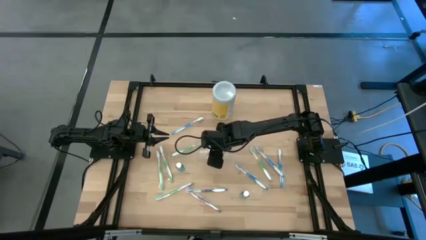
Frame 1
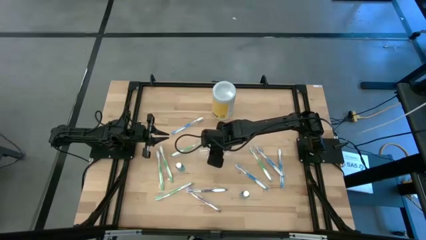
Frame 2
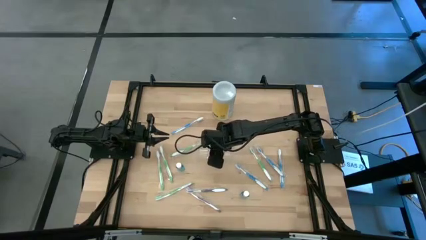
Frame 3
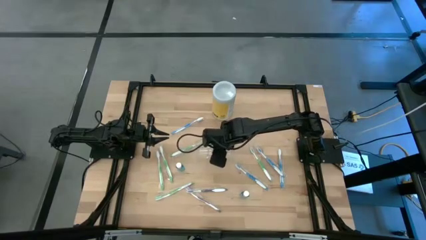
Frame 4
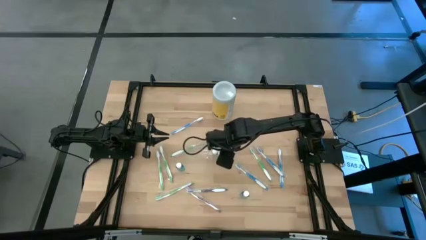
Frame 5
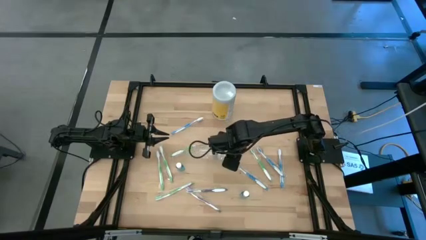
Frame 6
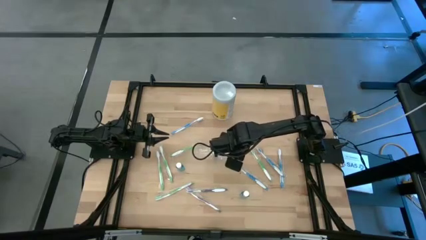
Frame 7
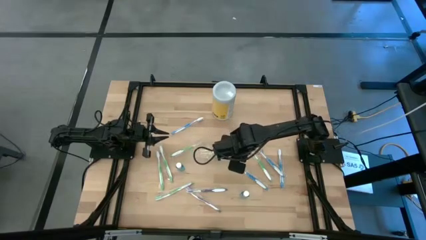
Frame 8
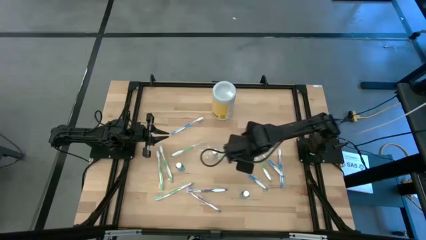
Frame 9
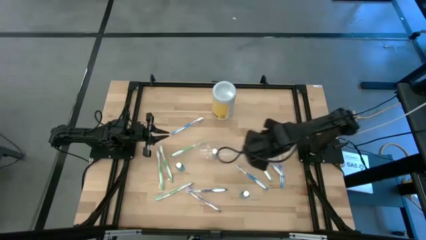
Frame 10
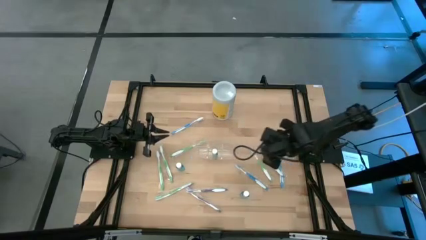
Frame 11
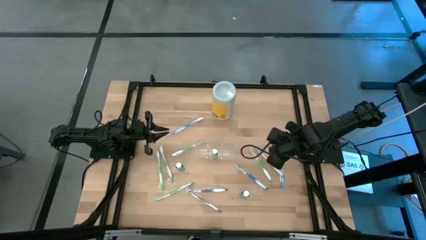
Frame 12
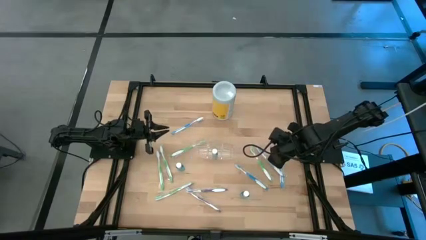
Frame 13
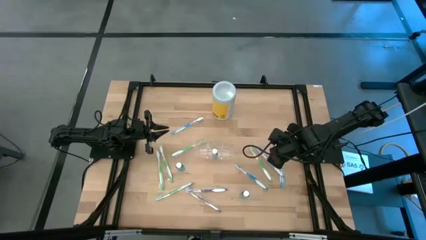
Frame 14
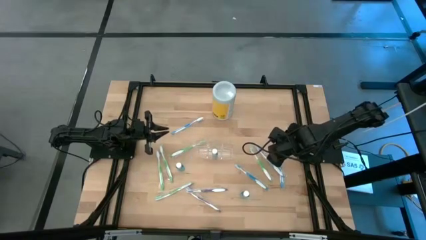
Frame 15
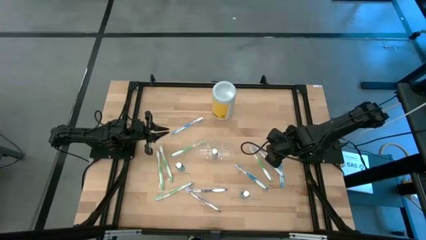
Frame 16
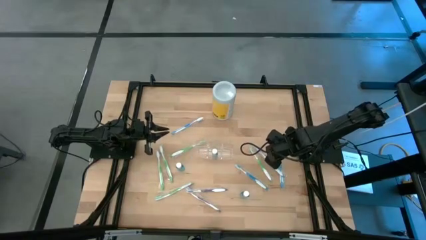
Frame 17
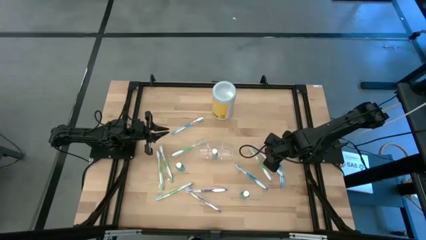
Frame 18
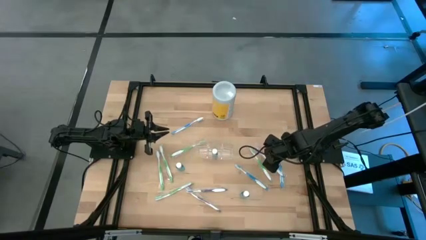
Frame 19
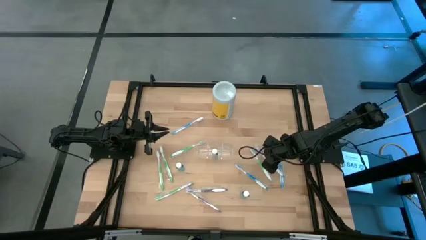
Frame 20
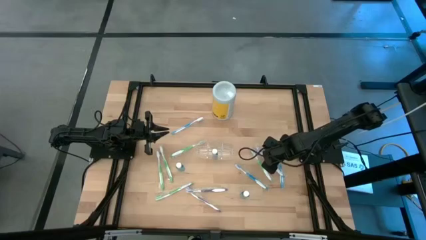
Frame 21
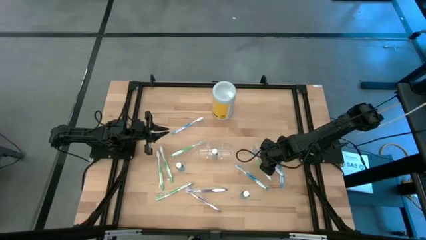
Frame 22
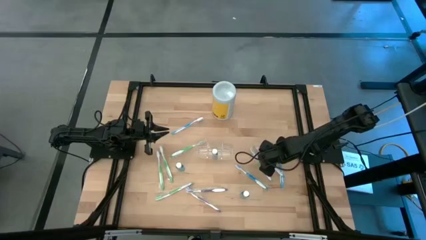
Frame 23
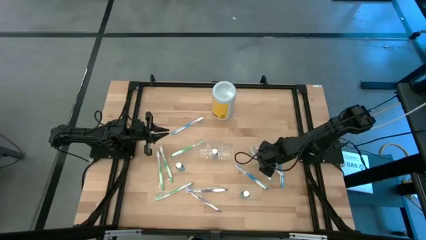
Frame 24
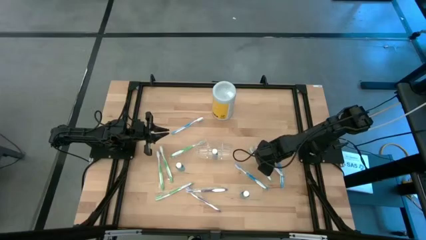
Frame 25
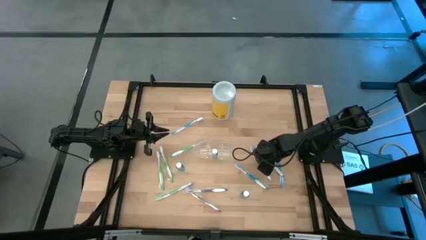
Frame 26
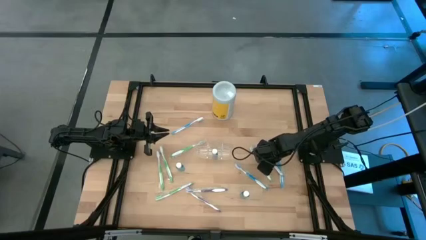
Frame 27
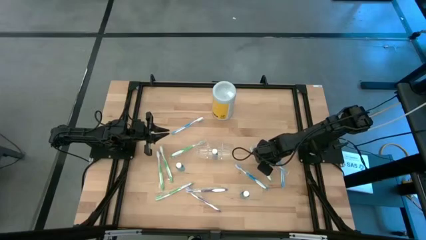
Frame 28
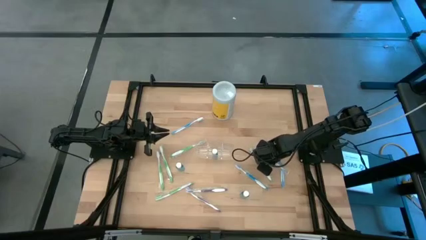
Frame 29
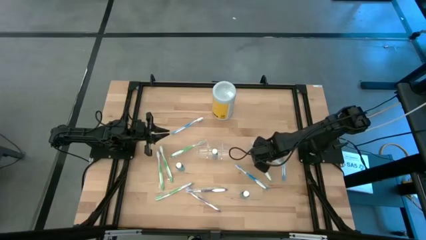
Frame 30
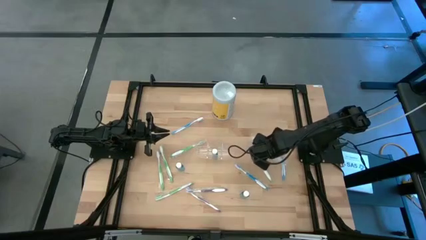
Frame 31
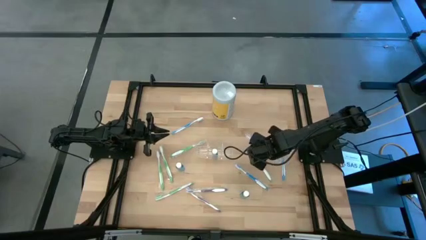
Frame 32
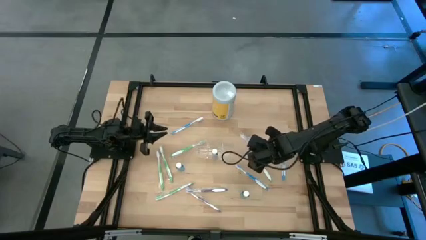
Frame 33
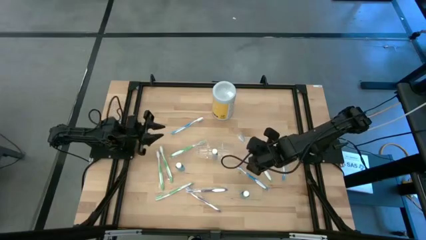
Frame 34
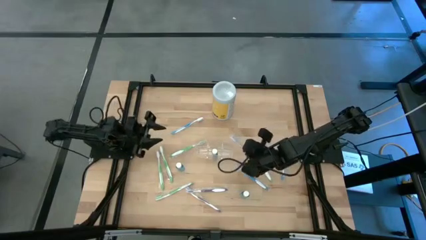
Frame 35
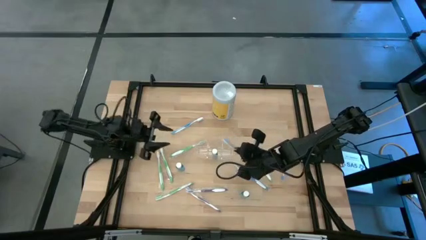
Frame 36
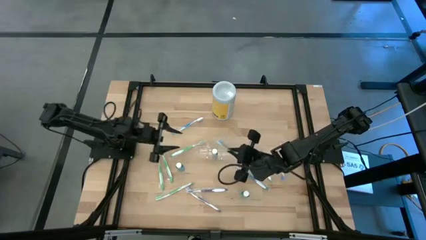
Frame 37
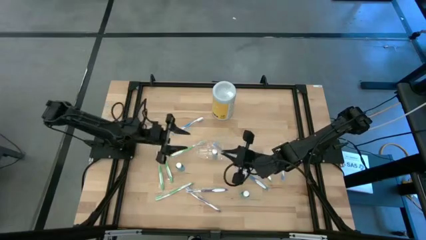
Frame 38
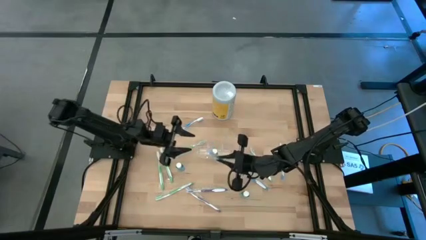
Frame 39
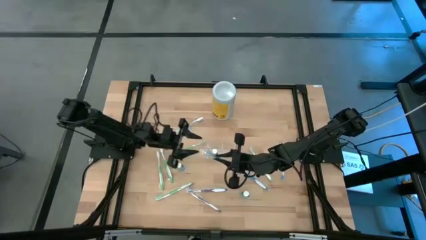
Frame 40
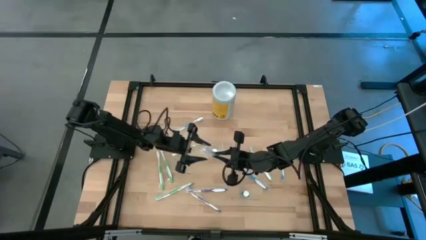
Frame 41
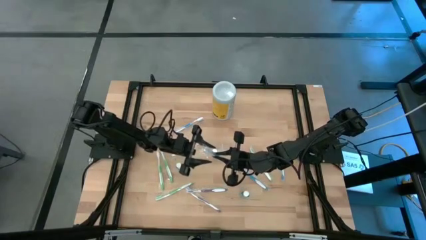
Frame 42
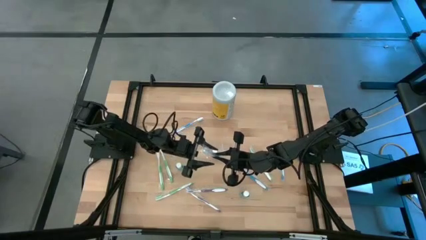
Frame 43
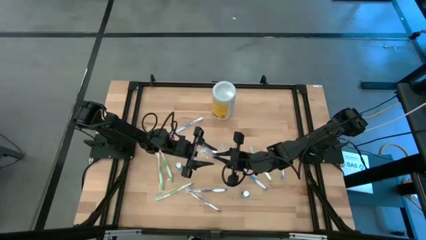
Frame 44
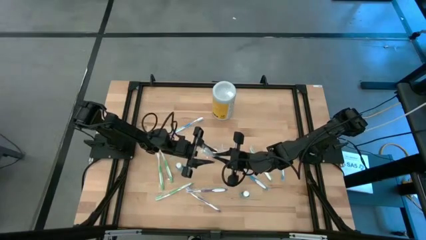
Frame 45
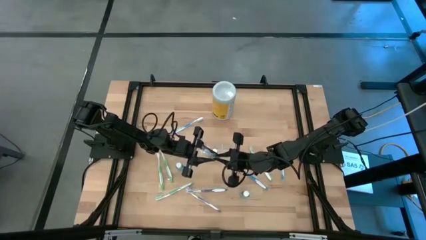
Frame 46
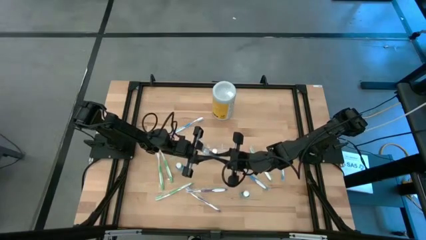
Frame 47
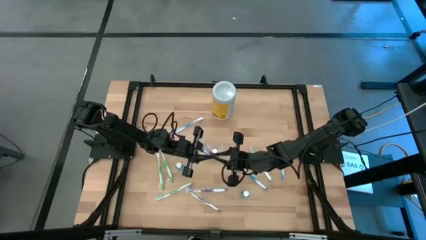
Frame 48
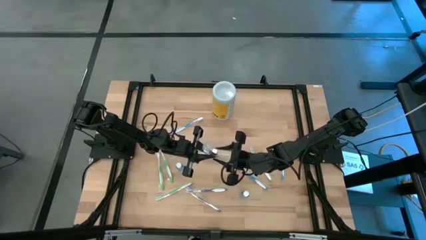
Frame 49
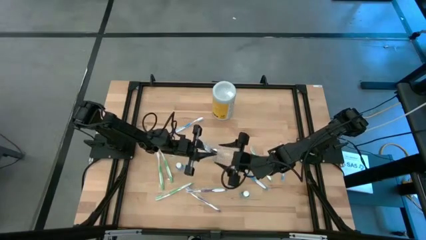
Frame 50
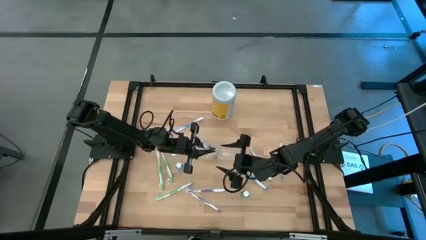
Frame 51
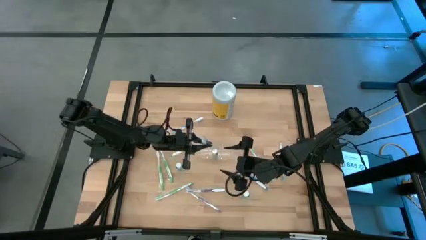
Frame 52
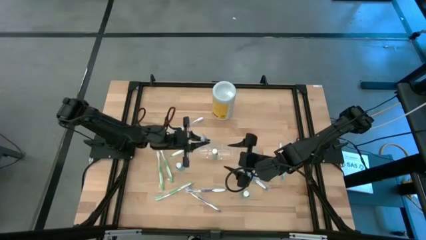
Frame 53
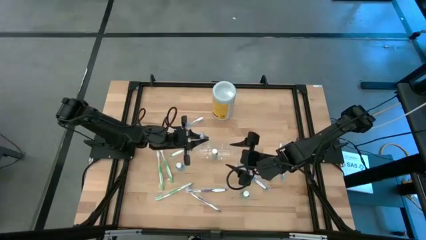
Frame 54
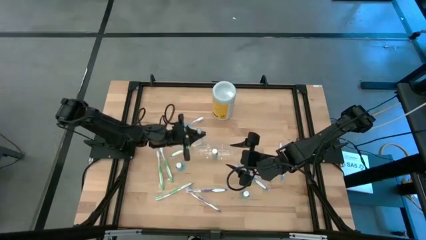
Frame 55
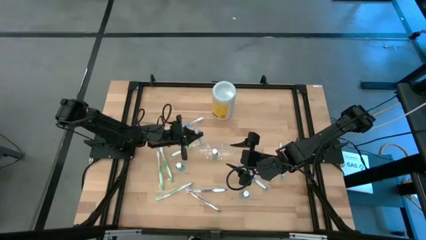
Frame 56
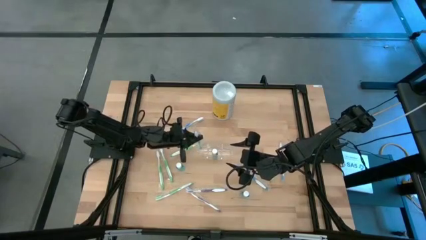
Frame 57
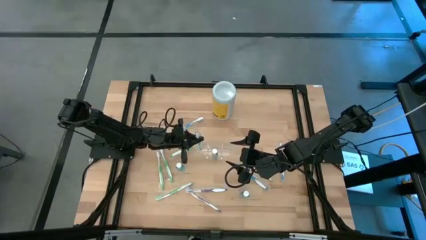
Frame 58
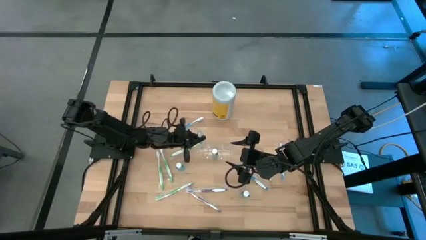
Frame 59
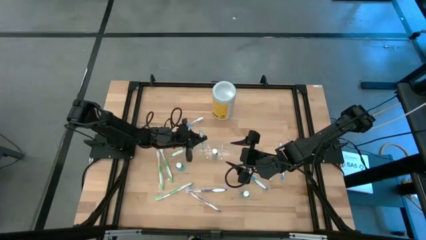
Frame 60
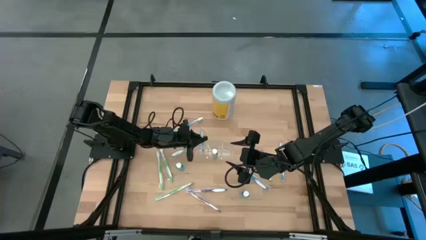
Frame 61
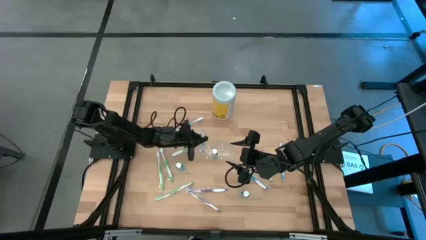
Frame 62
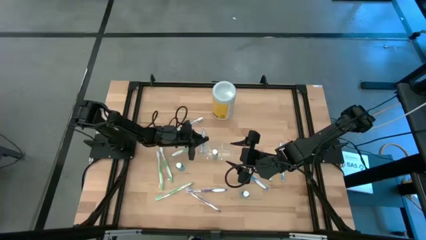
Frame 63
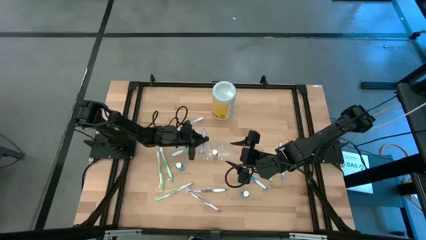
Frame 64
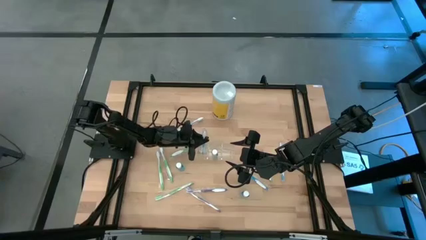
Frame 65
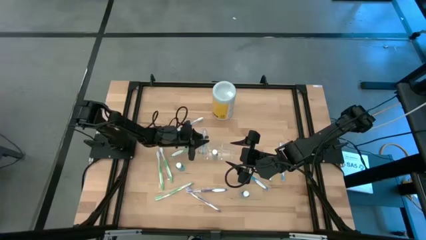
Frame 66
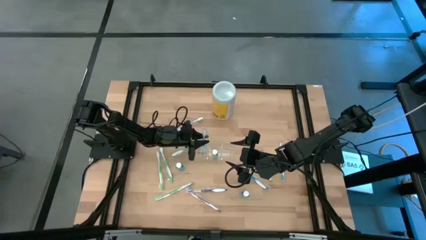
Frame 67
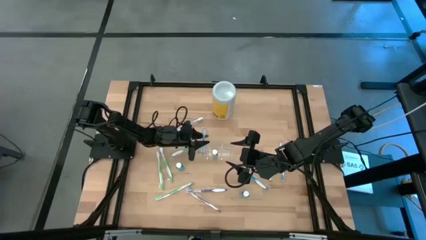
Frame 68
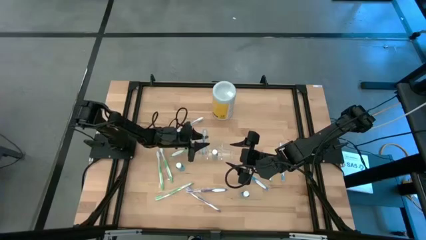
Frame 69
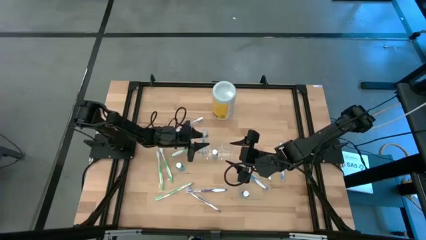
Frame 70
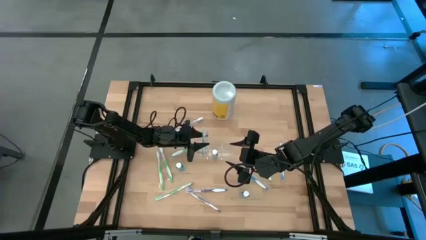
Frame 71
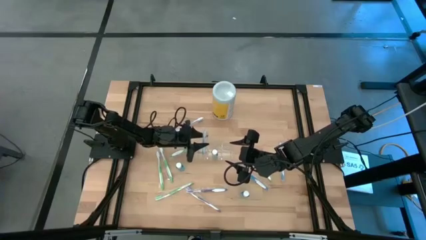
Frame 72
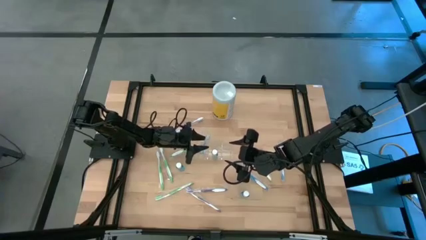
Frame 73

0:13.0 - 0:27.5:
Task: Pick & Place toothbrushing station
Put the blue toothbrush into the transparent organizer
